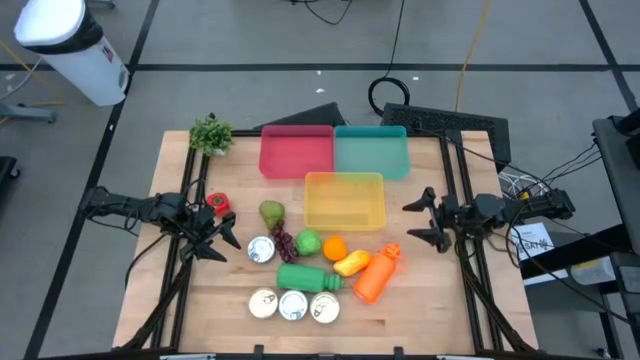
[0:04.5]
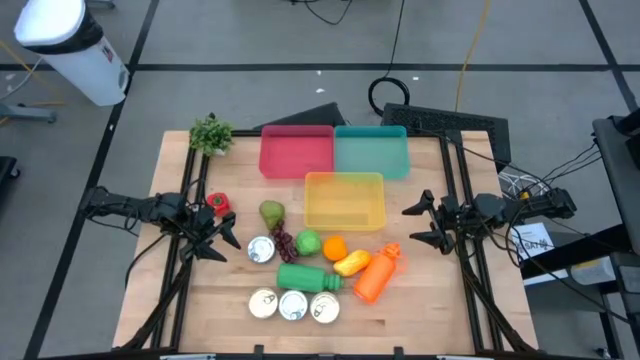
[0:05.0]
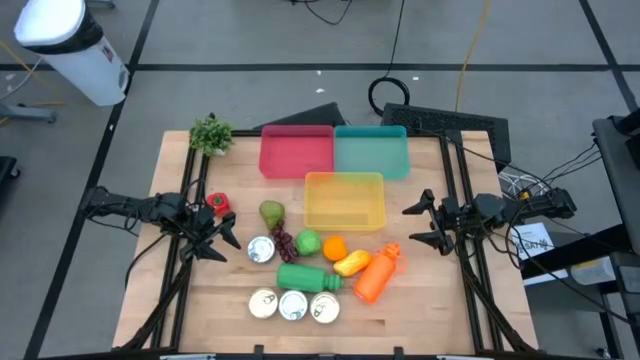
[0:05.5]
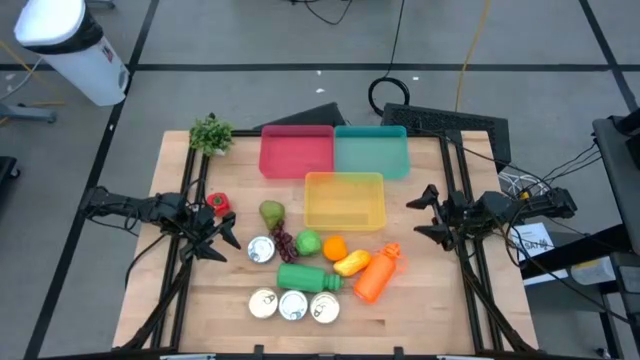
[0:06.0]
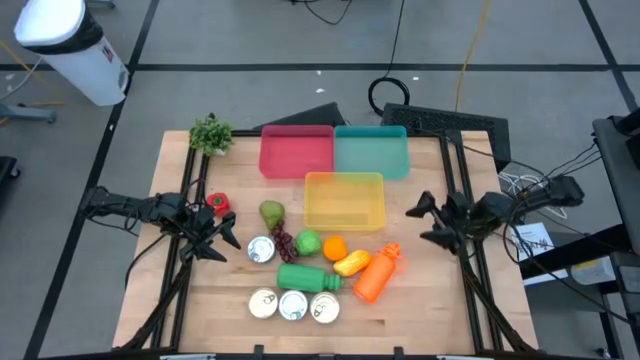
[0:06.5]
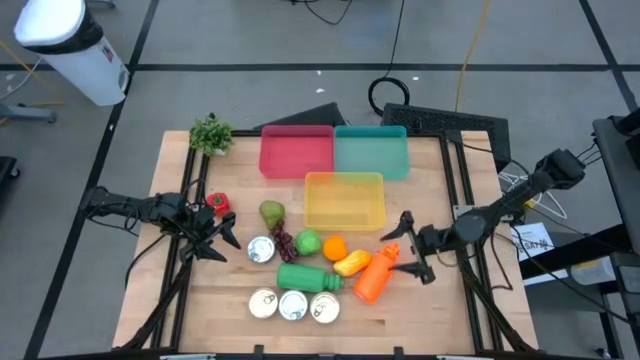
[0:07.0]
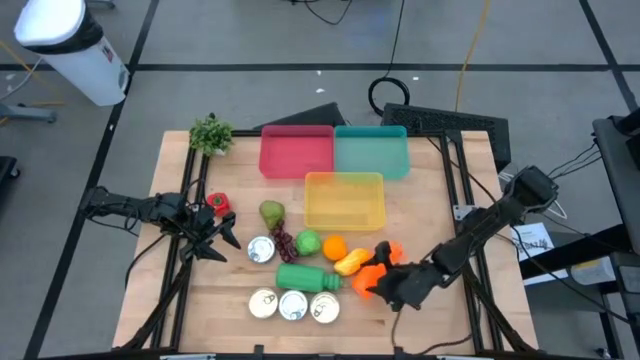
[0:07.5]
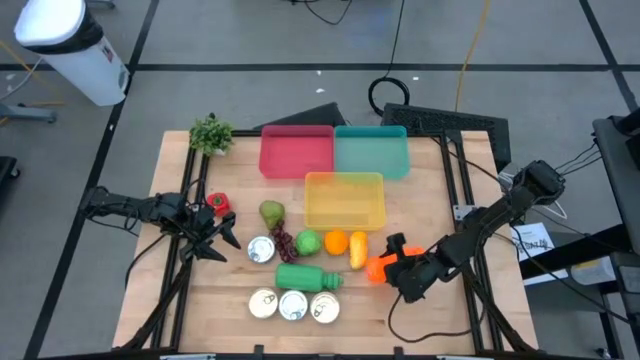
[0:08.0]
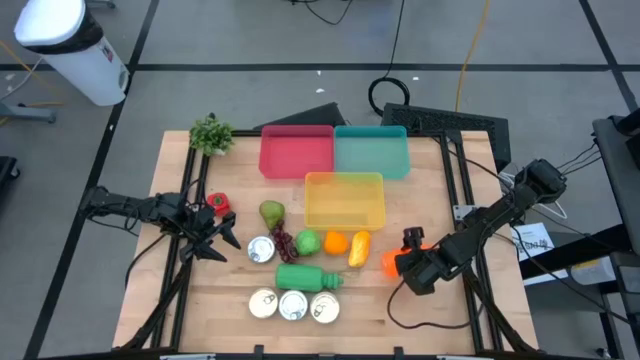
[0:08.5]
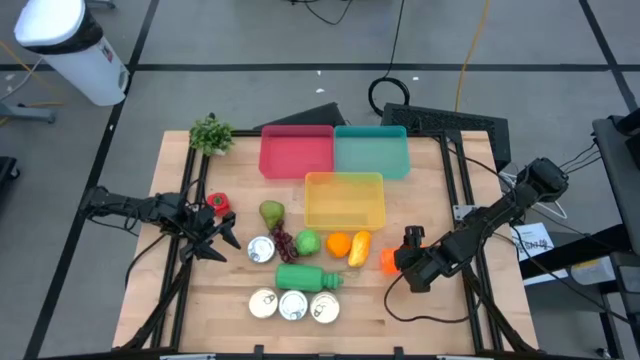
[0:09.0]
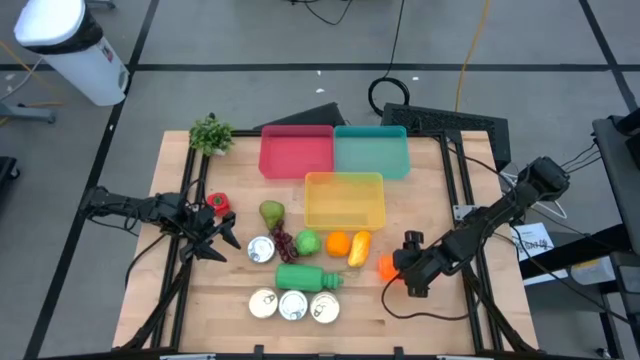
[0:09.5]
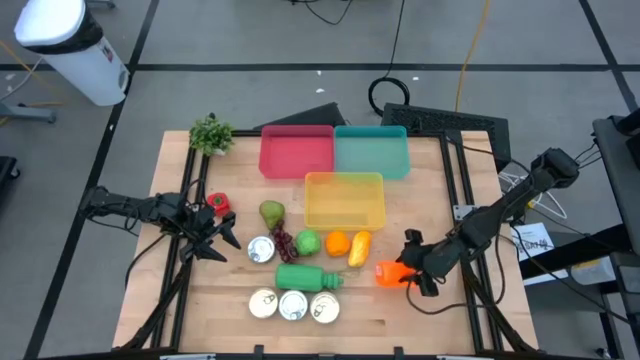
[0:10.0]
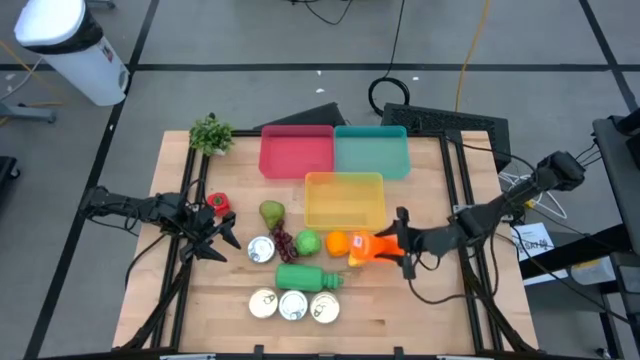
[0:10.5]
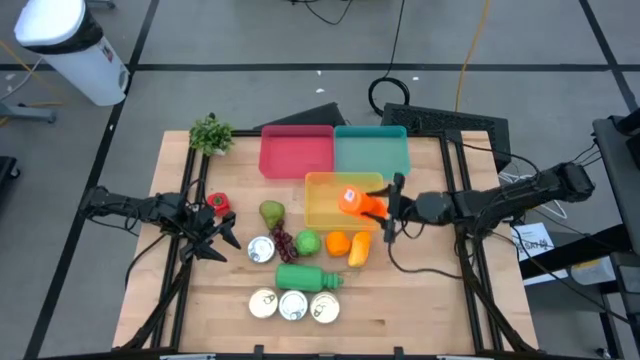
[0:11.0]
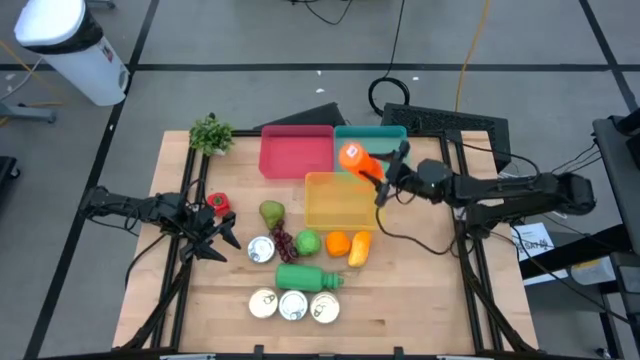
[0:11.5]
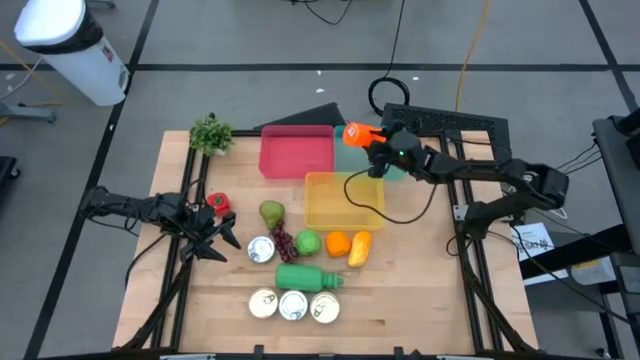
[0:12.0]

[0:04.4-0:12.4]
Task: Pick & Place Food Item
Put the orange water bottle into the green bin

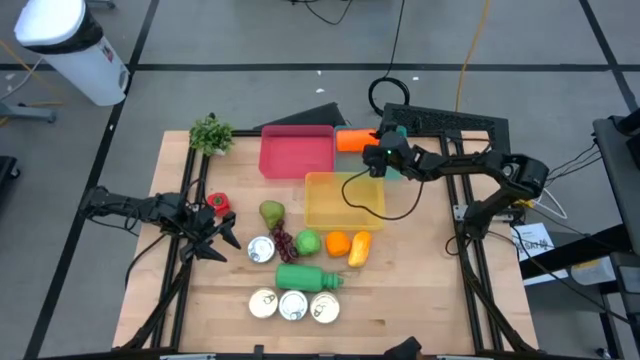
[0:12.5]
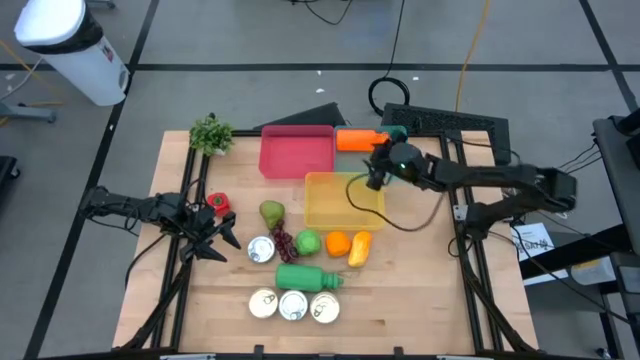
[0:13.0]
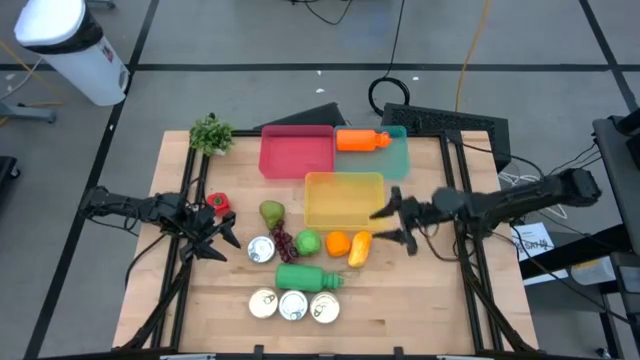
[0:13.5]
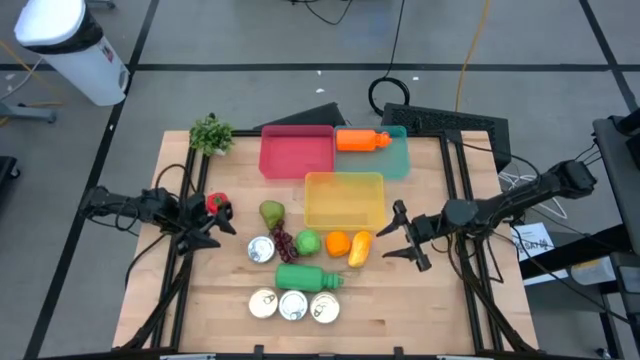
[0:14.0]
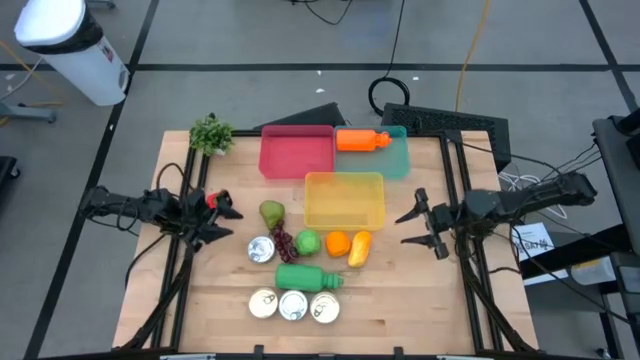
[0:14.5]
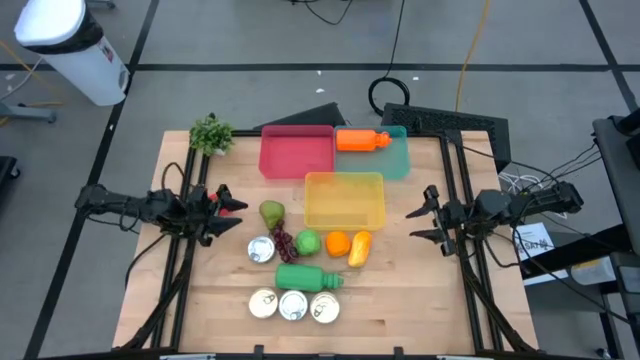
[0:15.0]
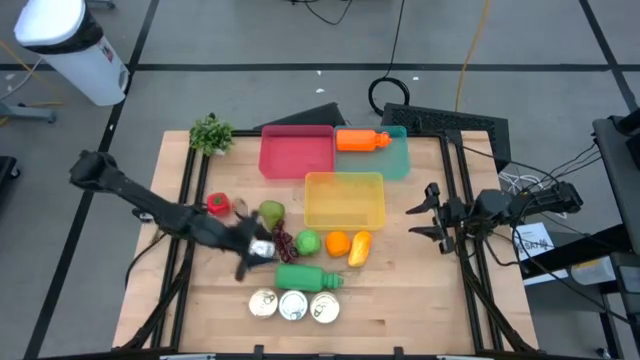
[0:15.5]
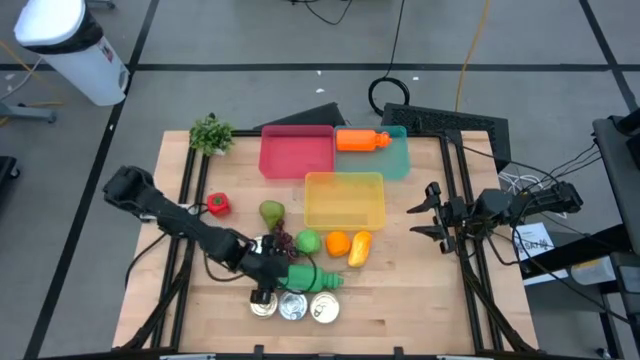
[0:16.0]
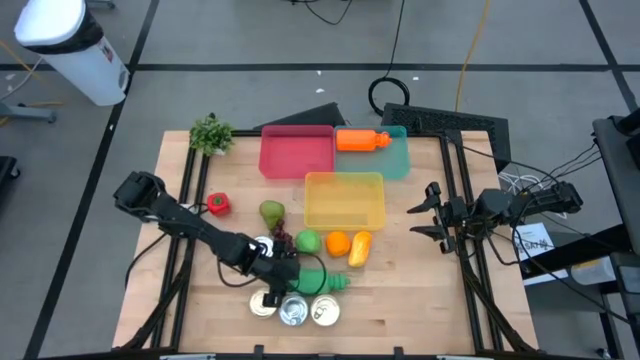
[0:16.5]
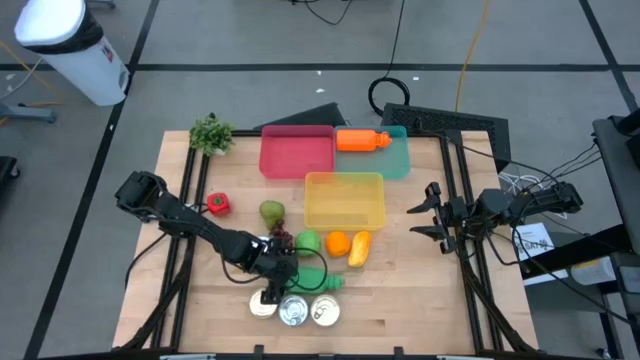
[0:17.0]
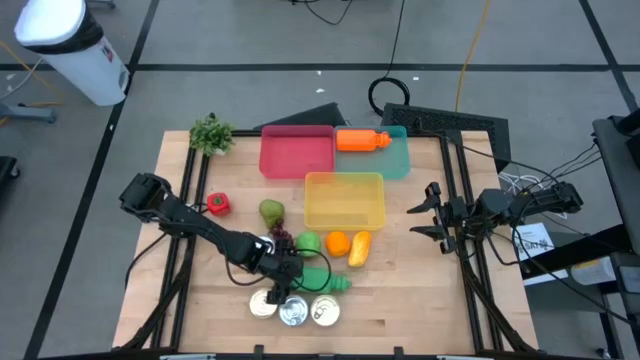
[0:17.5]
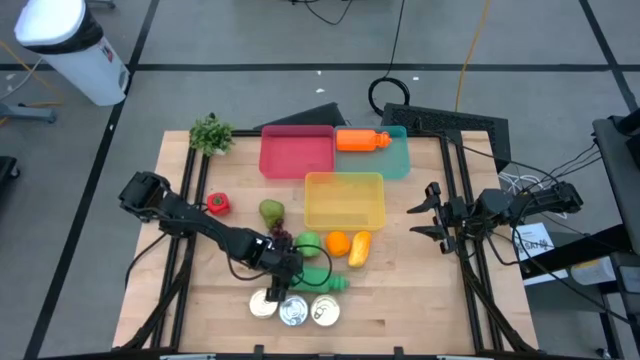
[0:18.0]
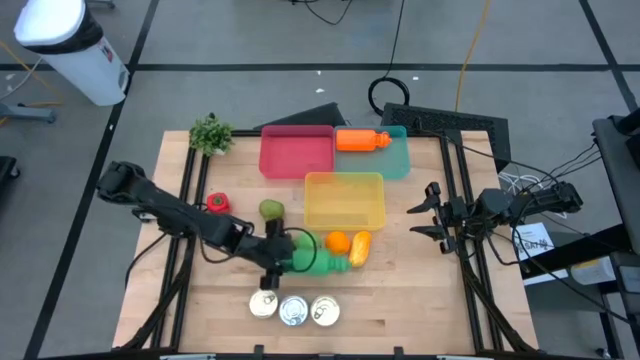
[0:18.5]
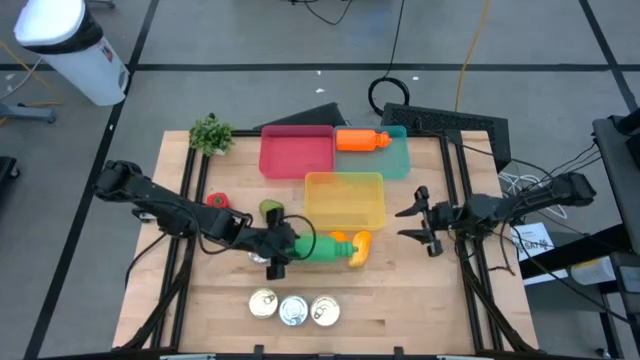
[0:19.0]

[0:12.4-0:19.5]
Put the green water bottle into the green bin

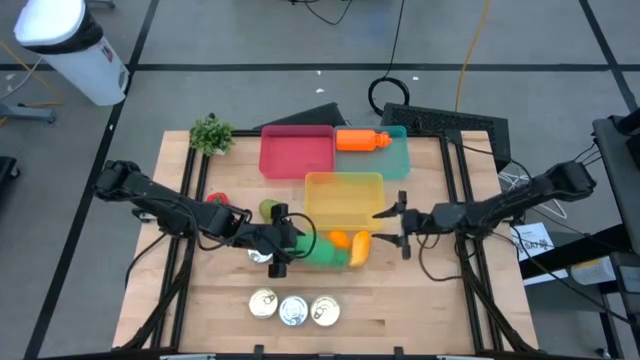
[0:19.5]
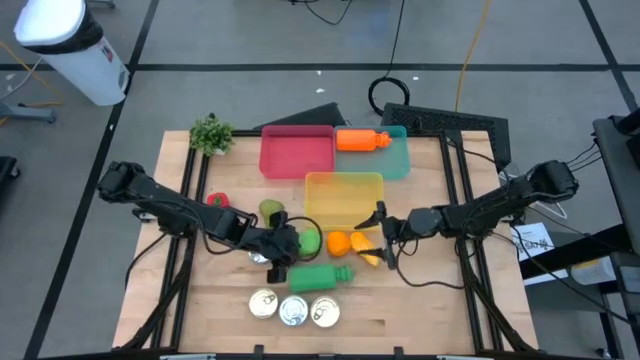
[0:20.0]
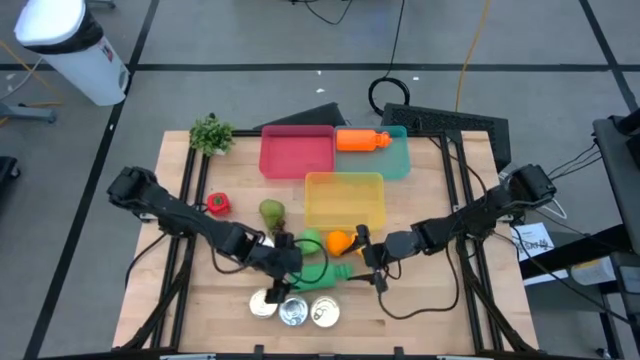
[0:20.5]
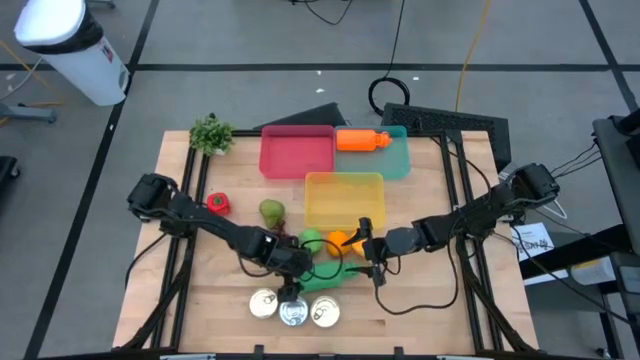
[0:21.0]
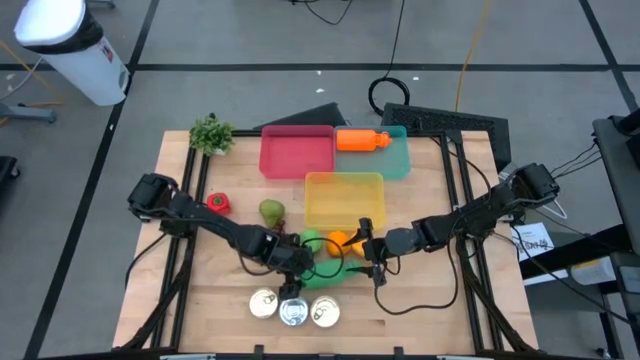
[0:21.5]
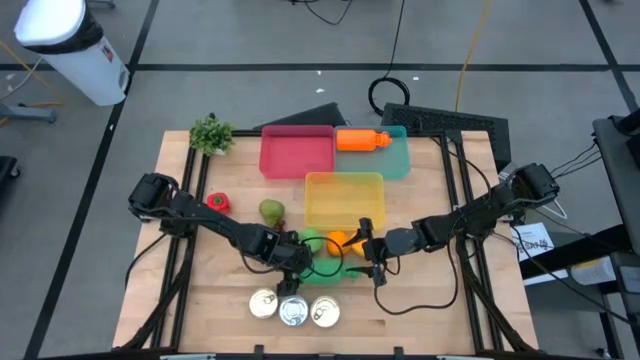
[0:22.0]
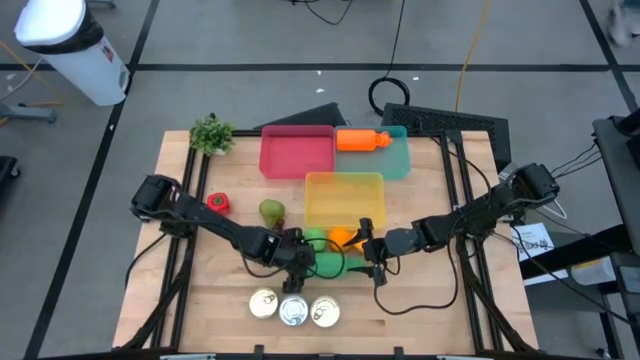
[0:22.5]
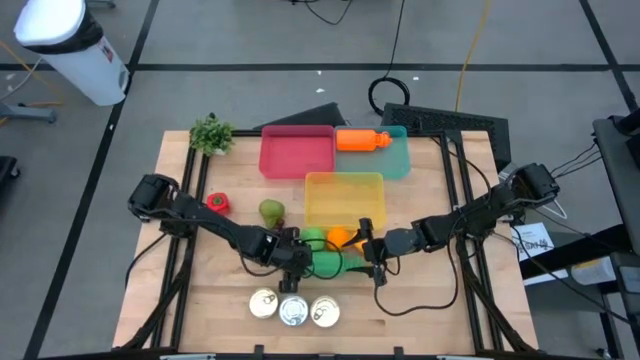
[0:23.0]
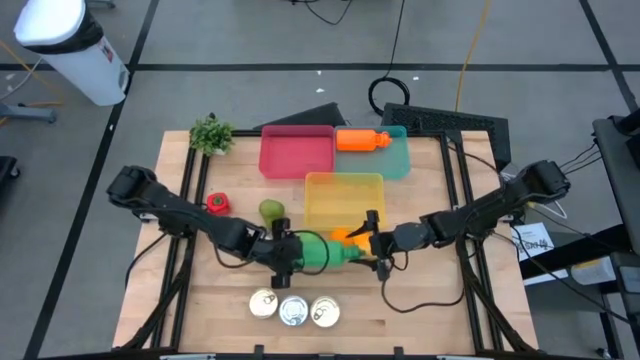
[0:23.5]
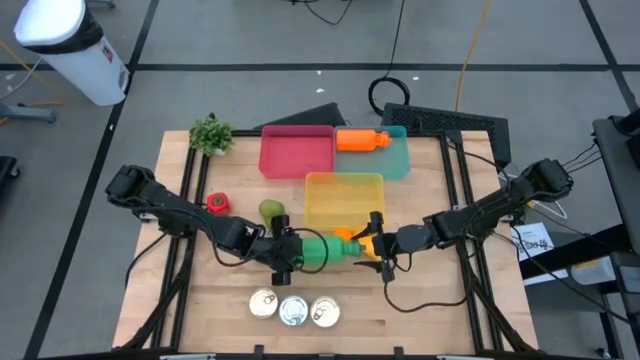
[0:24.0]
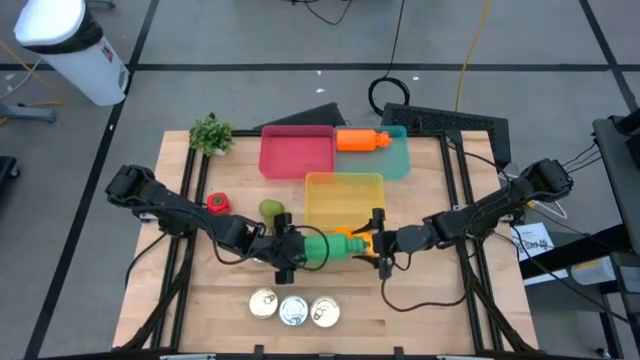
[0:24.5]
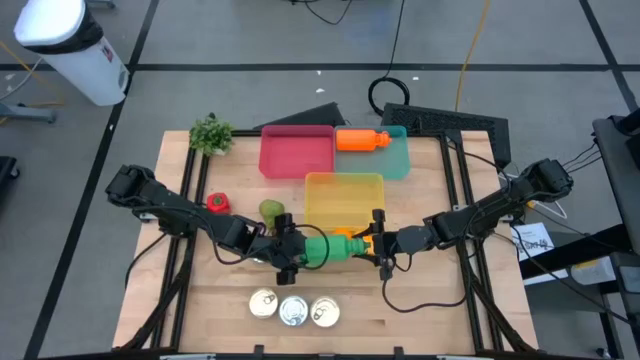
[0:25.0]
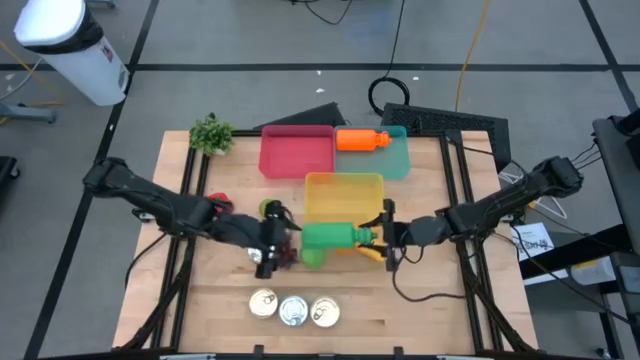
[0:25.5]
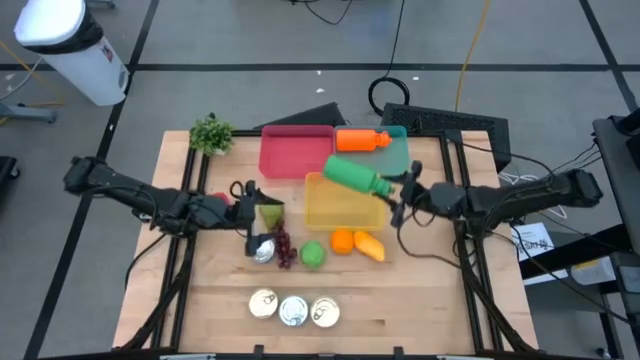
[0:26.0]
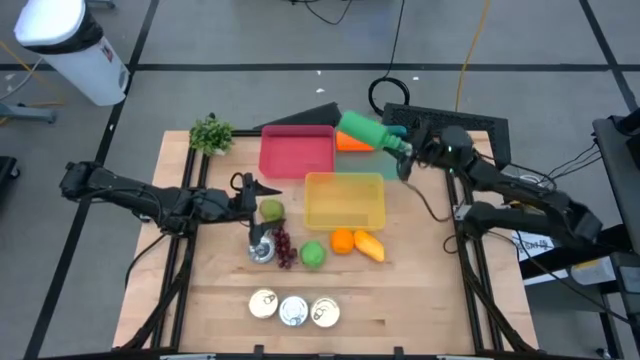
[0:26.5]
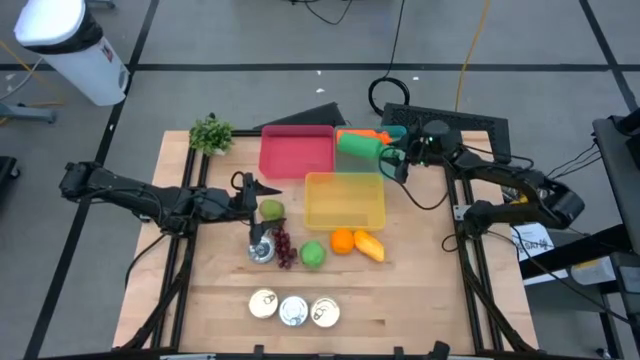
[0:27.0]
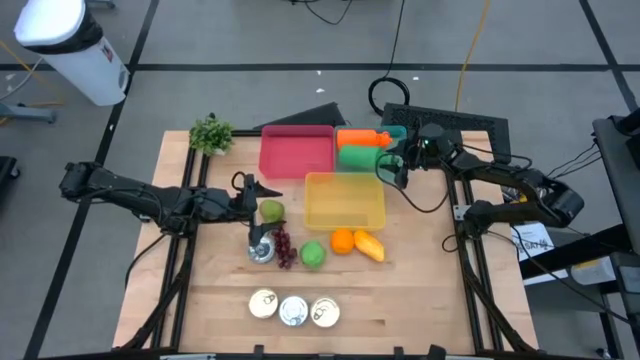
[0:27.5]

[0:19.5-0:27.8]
Put the green water bottle into the green bin
